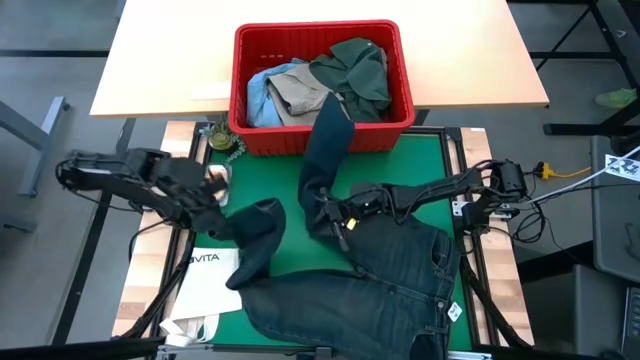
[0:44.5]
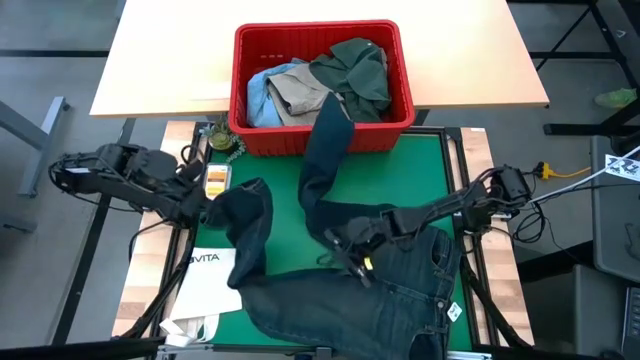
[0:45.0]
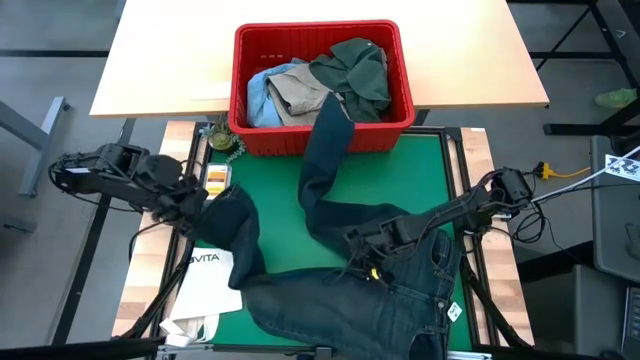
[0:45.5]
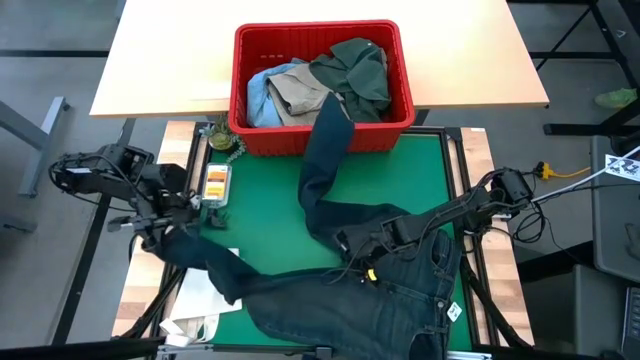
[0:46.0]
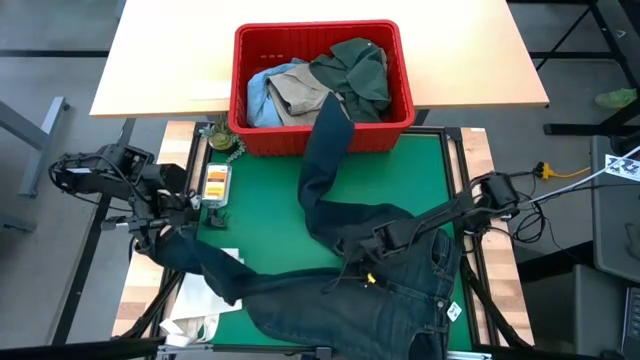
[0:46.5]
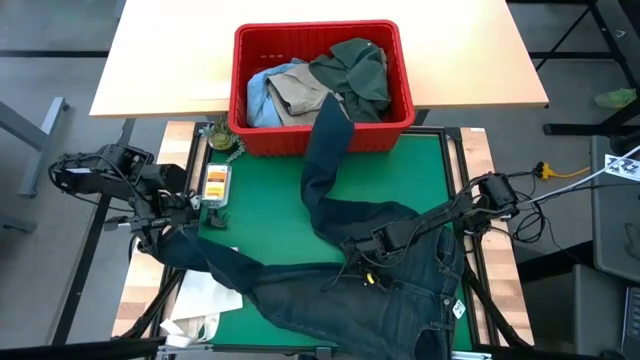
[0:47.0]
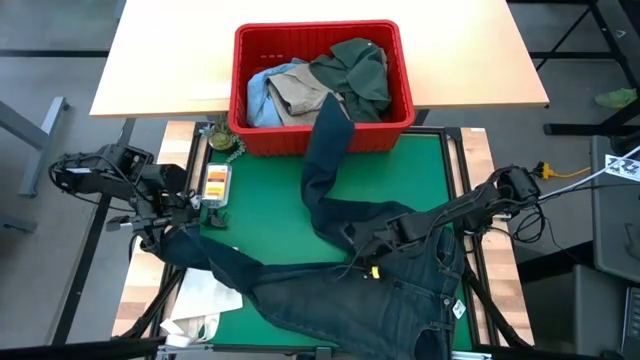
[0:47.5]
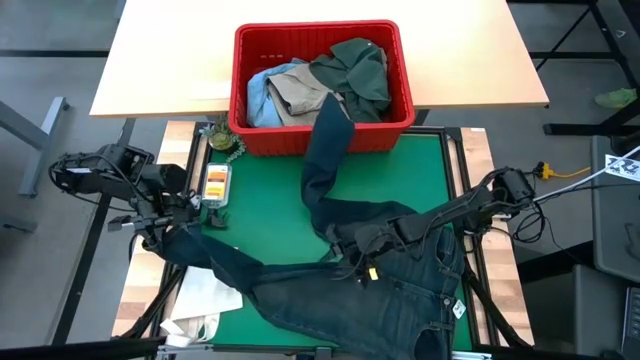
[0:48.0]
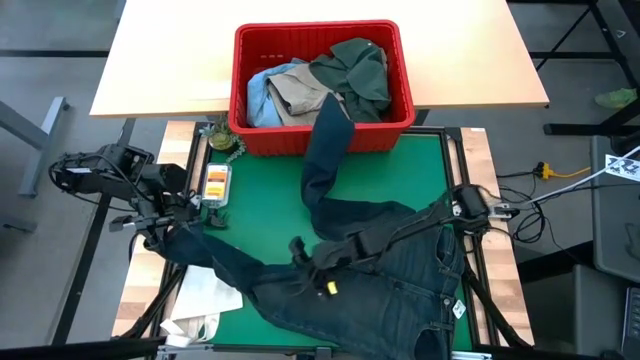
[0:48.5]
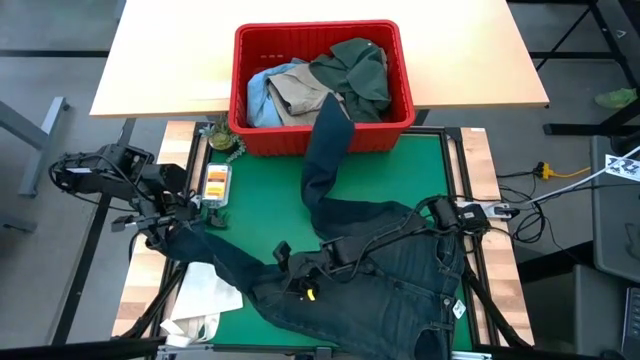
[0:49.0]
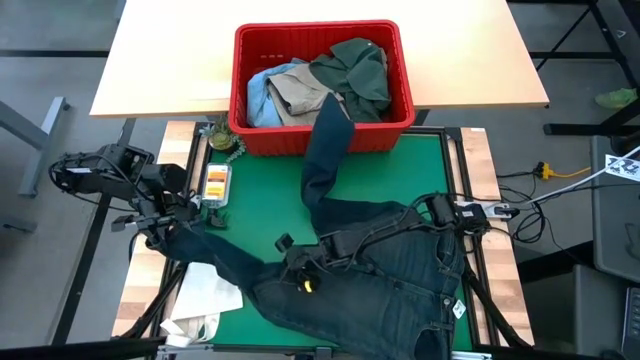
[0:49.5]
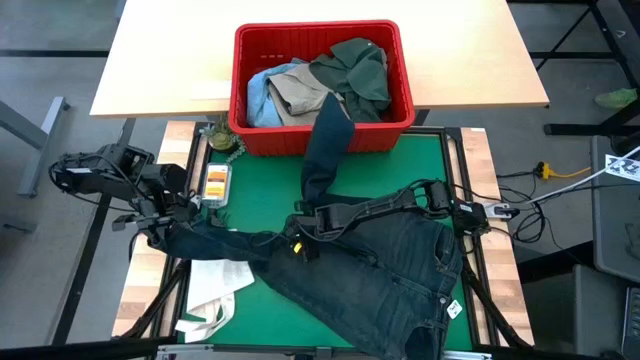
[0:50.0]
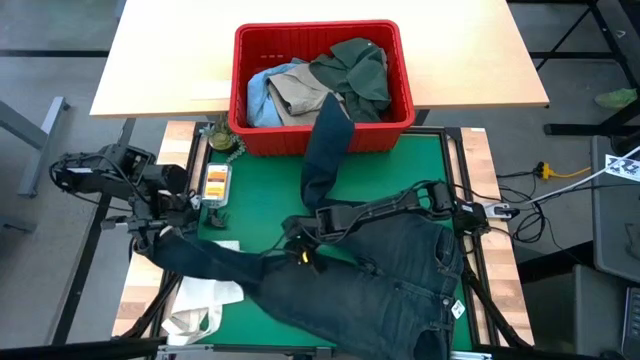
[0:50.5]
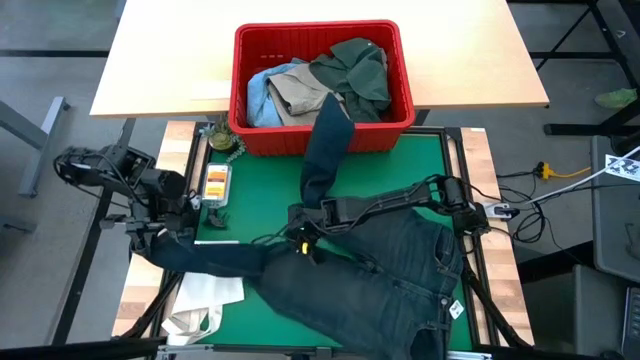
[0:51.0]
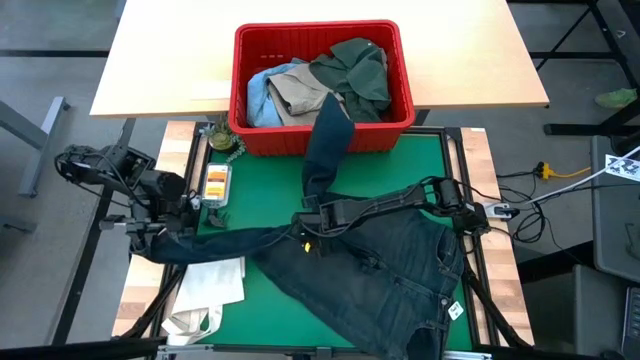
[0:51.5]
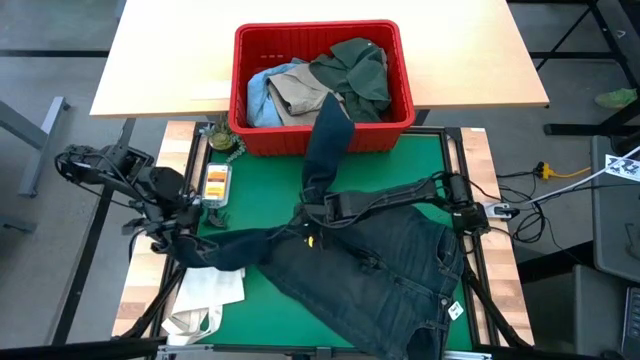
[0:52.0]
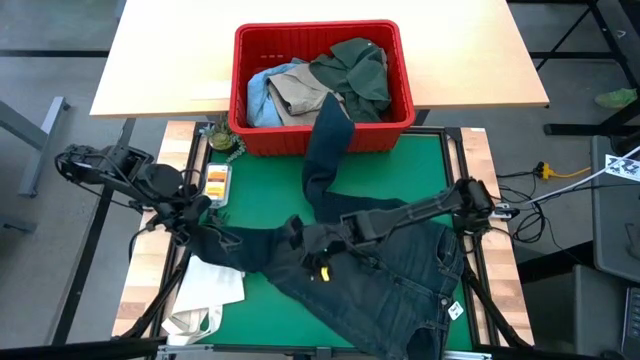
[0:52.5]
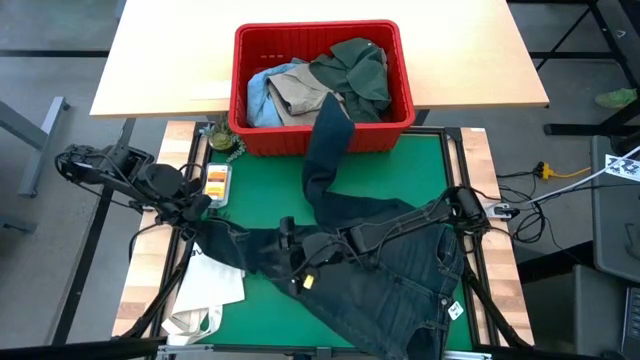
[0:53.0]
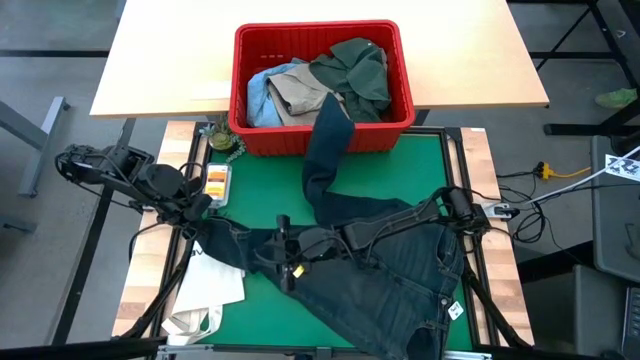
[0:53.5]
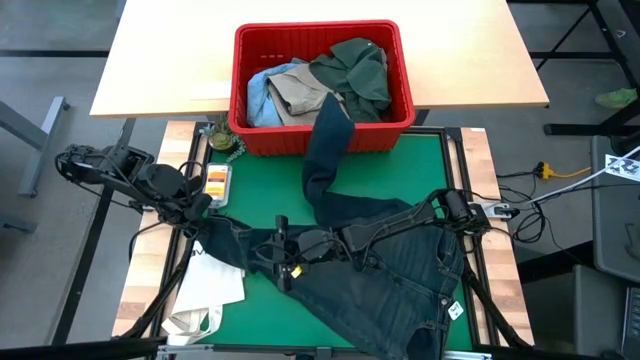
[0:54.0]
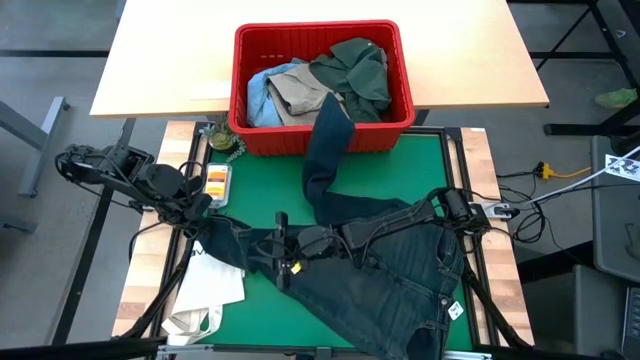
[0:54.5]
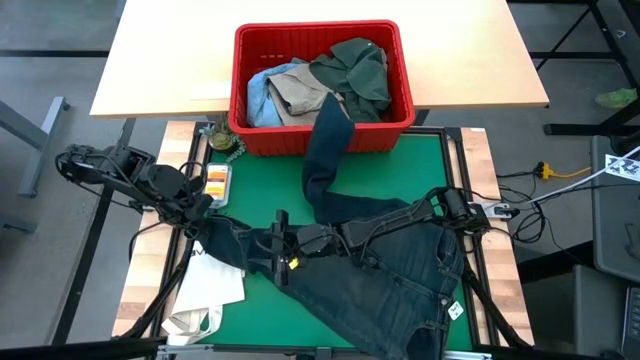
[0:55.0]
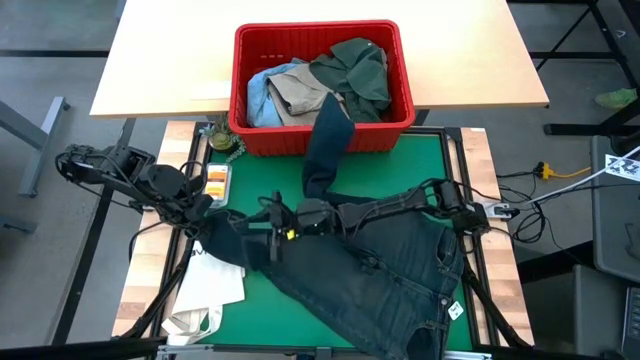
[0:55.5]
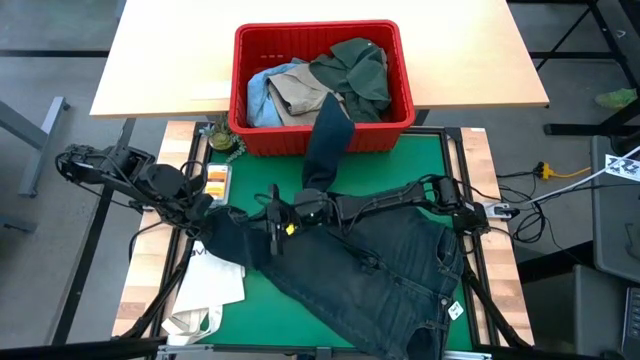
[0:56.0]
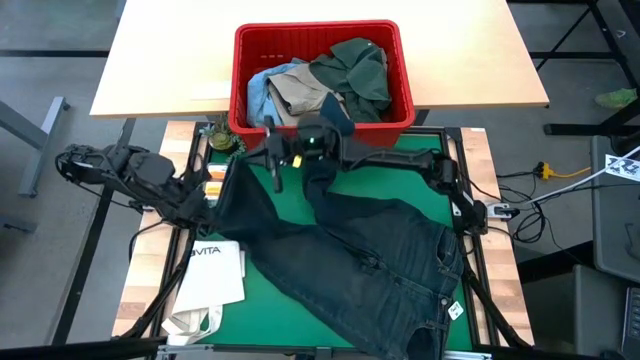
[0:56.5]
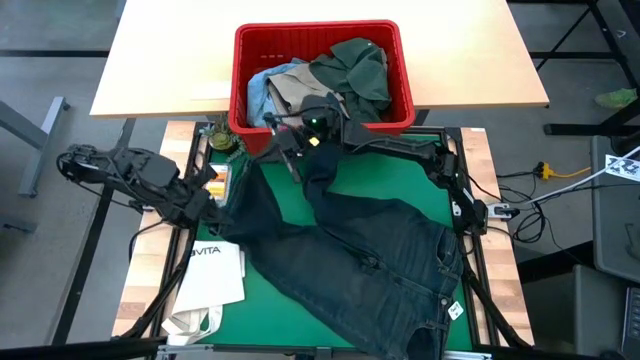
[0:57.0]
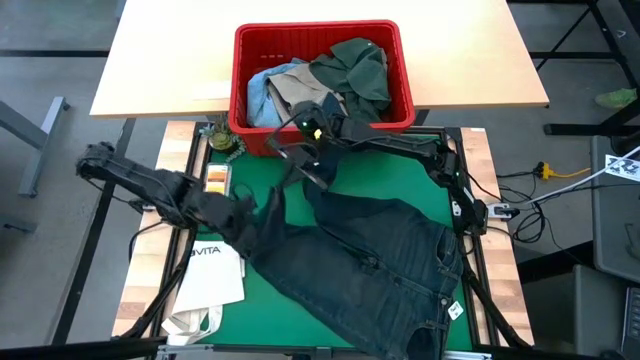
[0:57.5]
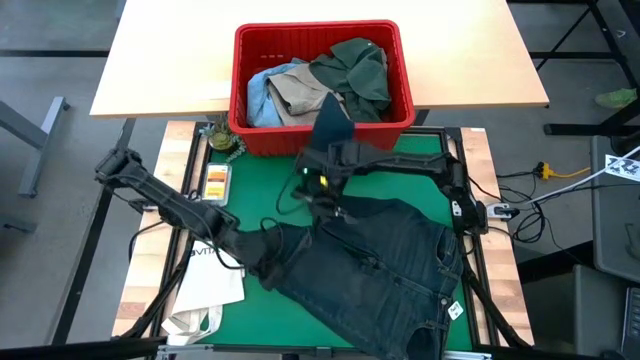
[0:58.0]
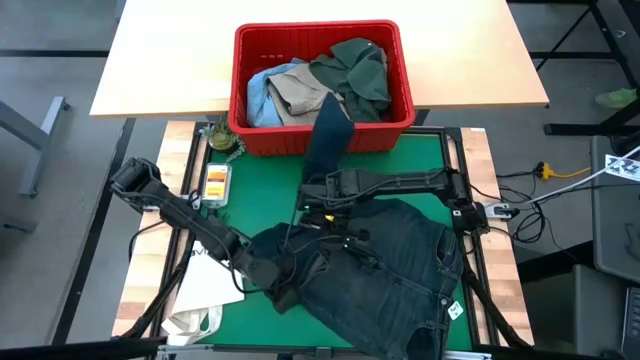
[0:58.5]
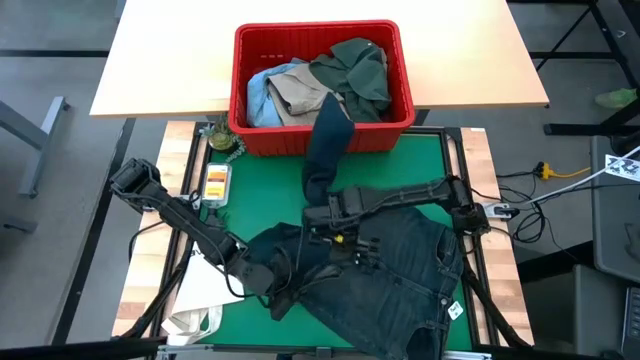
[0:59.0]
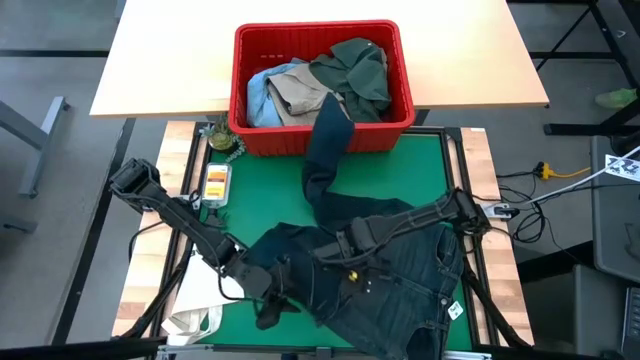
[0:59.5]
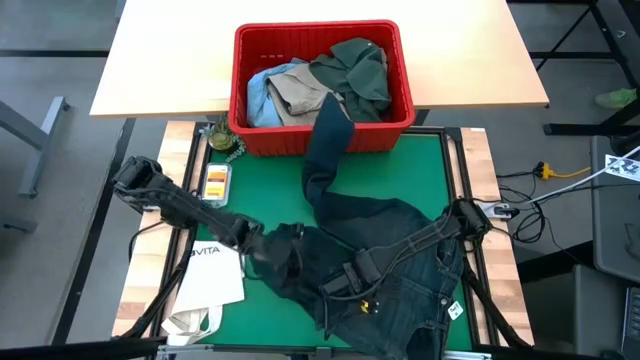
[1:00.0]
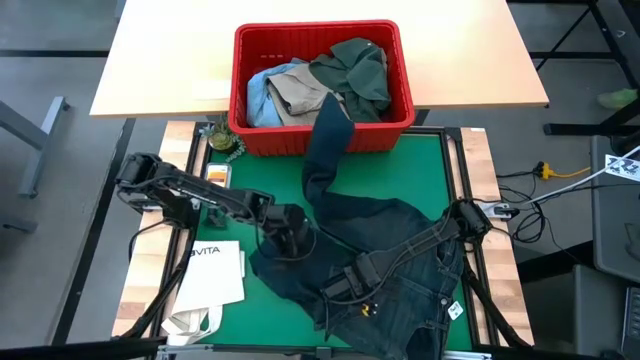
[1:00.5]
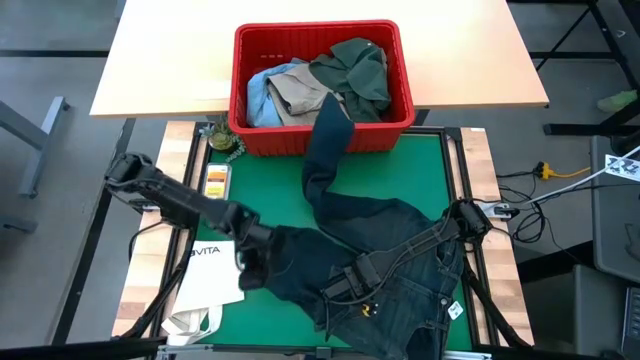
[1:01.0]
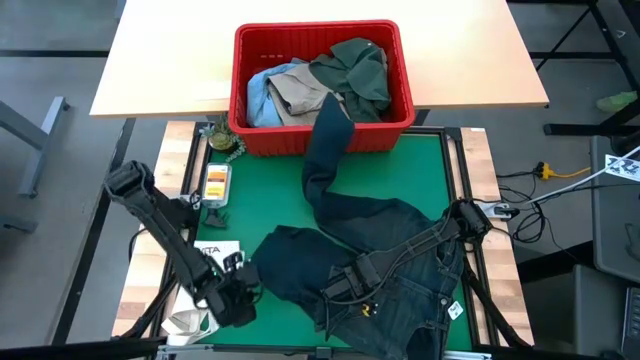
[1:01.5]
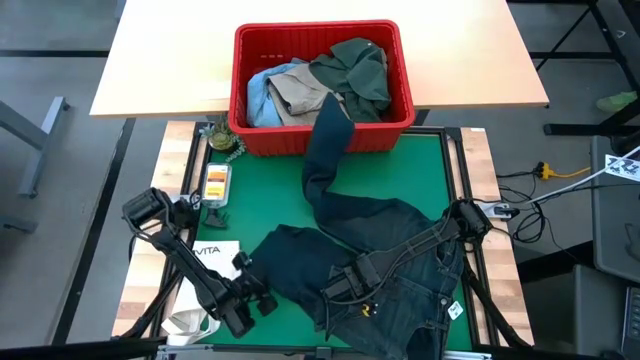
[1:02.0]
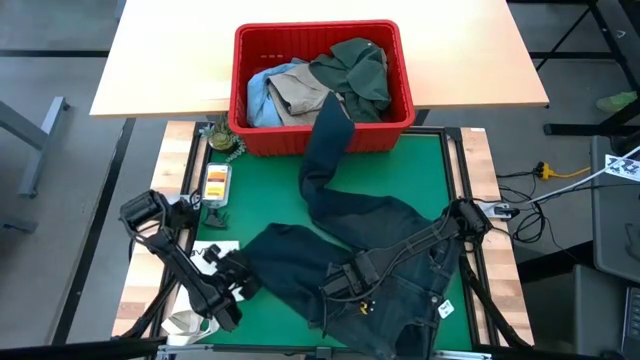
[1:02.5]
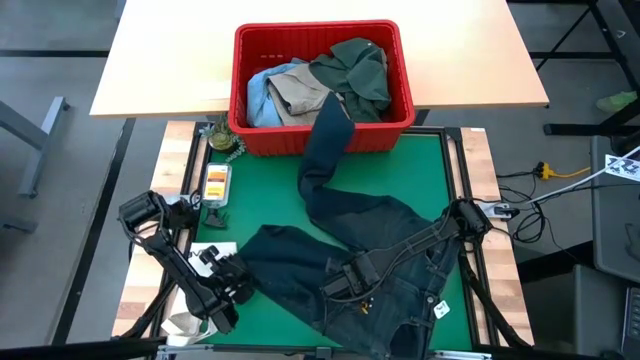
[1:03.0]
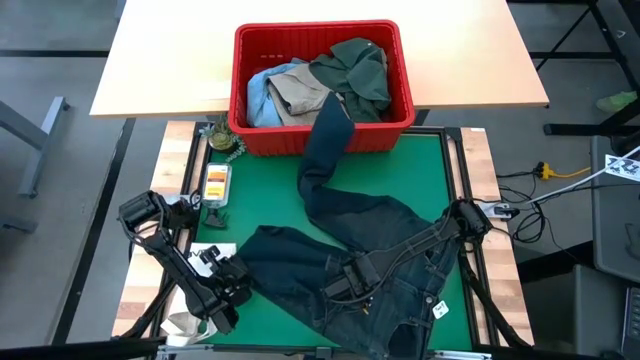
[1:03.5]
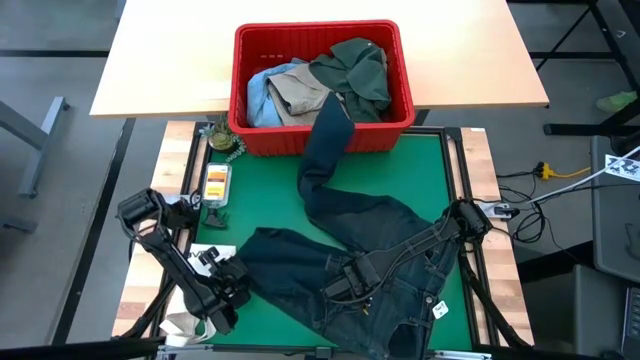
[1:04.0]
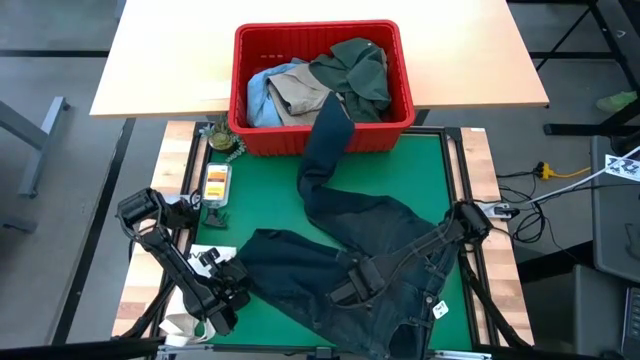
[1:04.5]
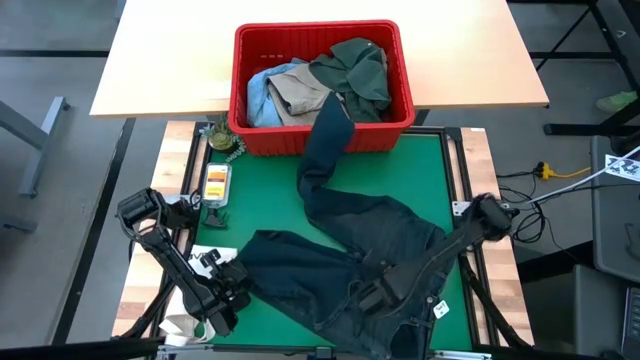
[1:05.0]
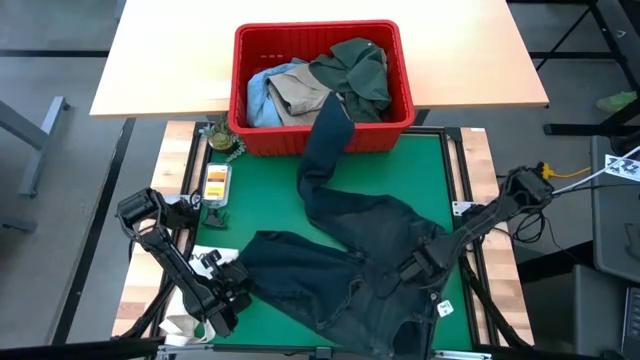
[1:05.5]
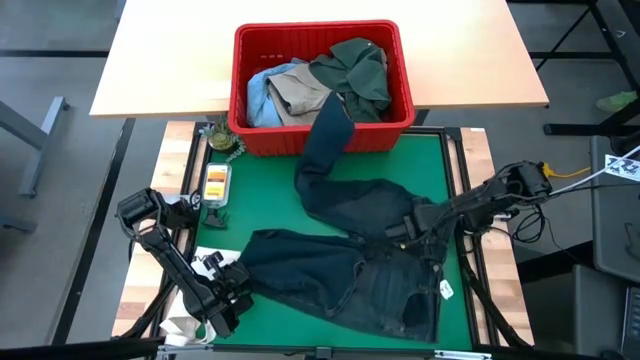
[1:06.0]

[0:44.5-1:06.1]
Task: Fold Laundry from Bin
Fold the dark blue pants
